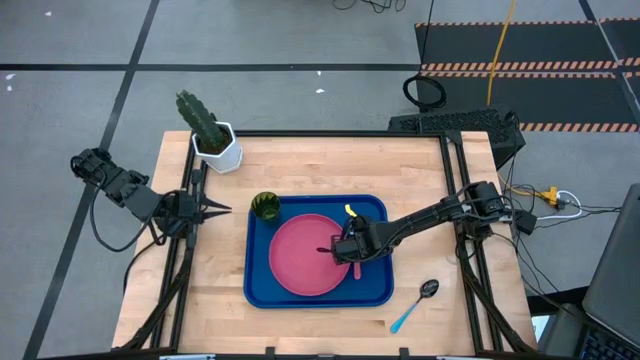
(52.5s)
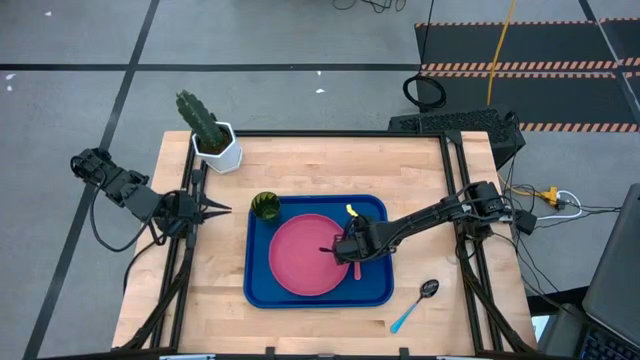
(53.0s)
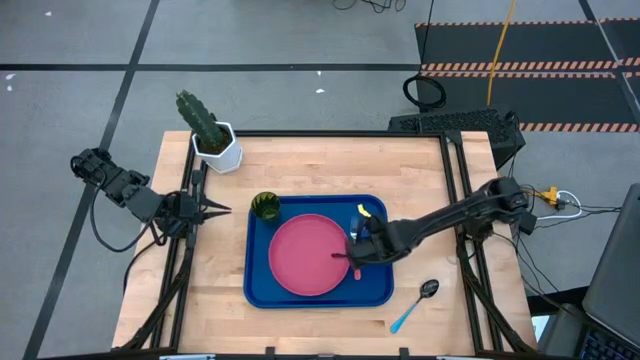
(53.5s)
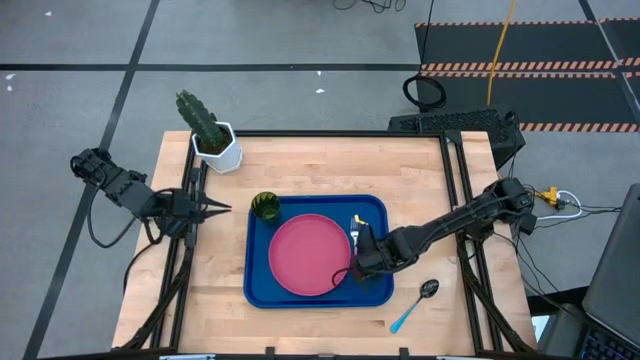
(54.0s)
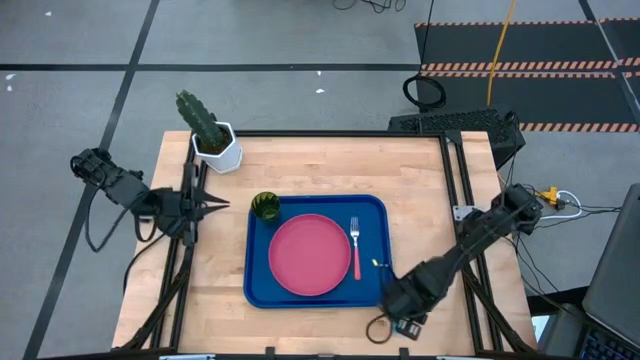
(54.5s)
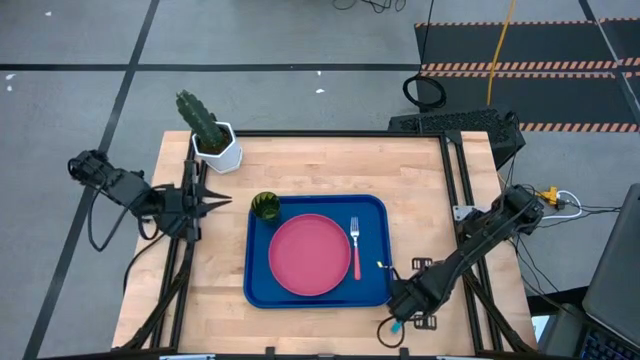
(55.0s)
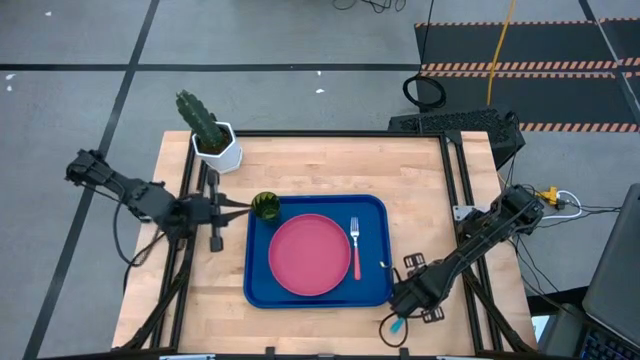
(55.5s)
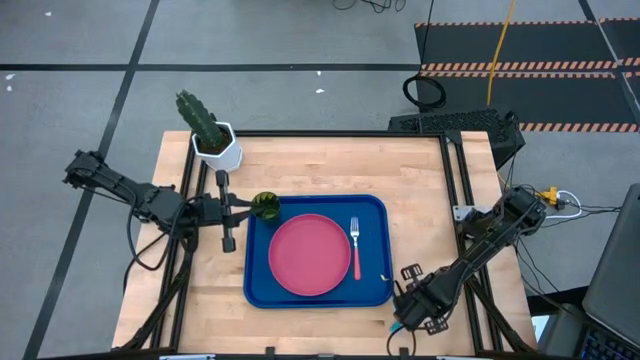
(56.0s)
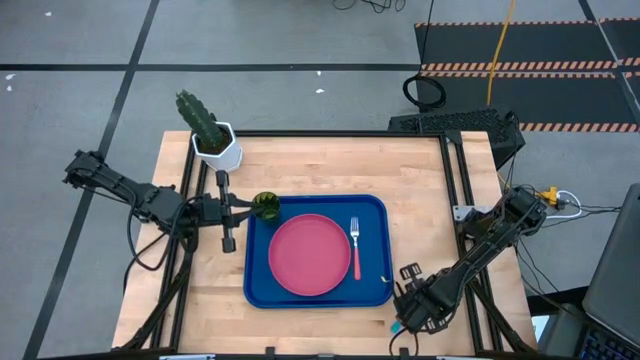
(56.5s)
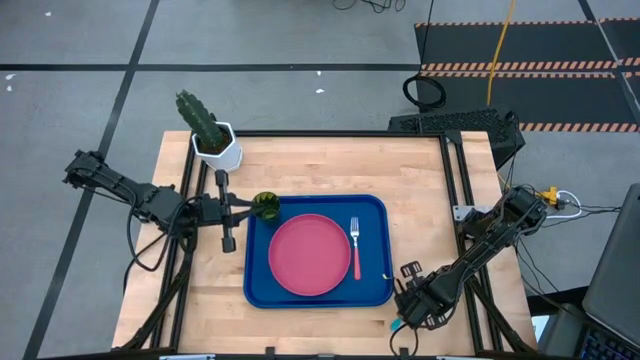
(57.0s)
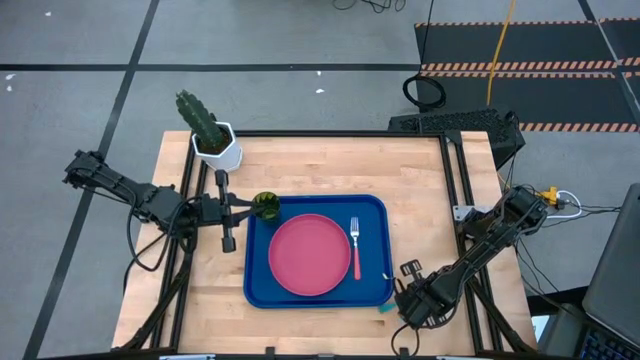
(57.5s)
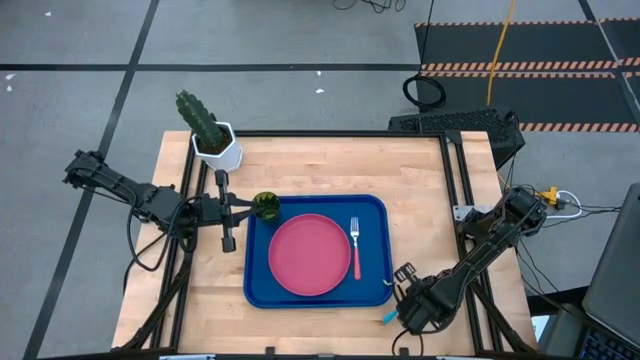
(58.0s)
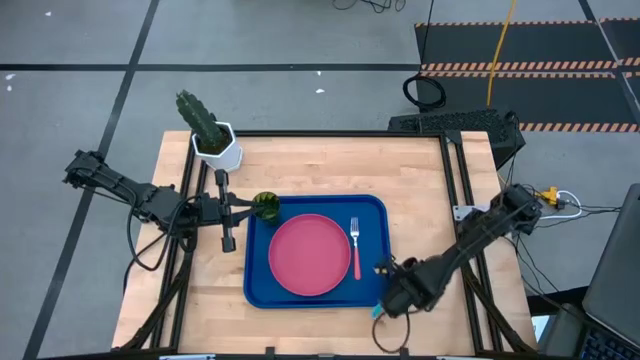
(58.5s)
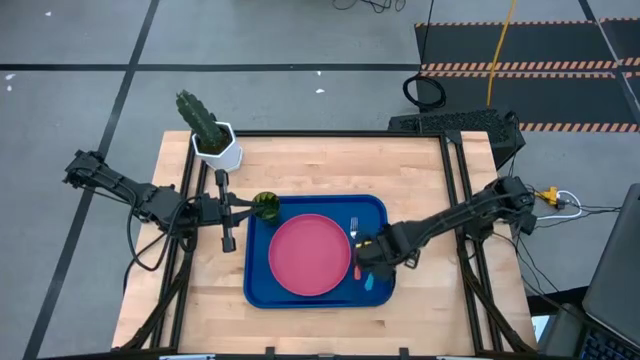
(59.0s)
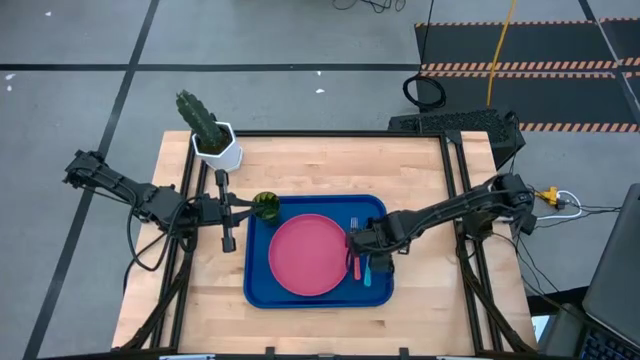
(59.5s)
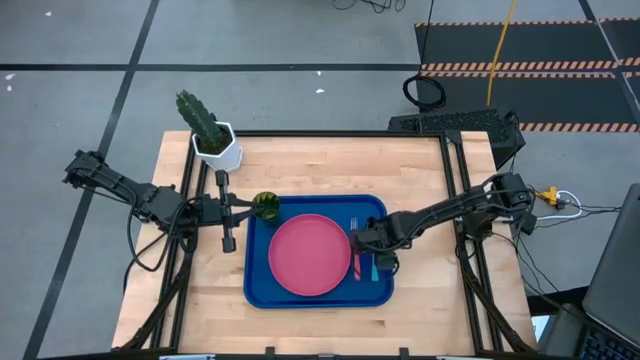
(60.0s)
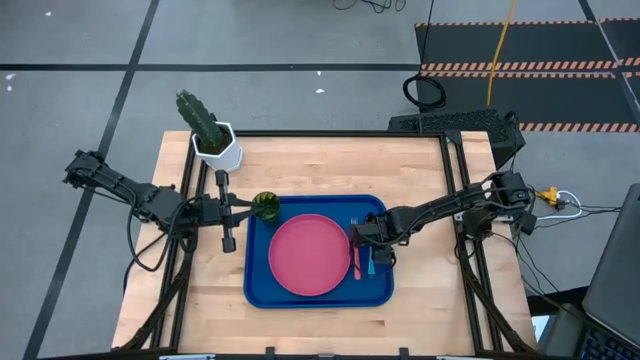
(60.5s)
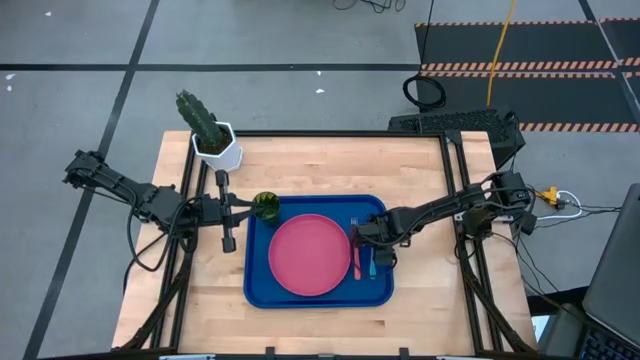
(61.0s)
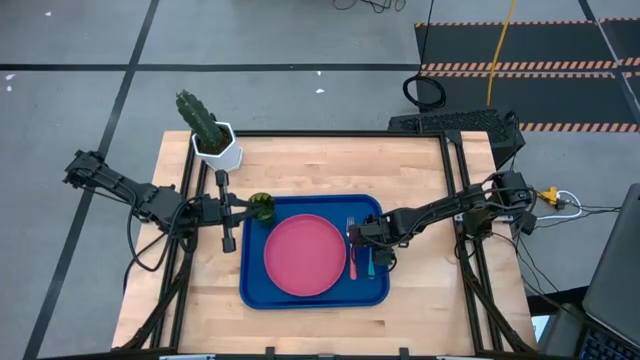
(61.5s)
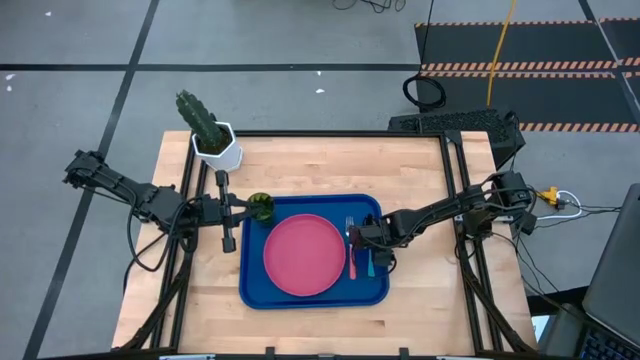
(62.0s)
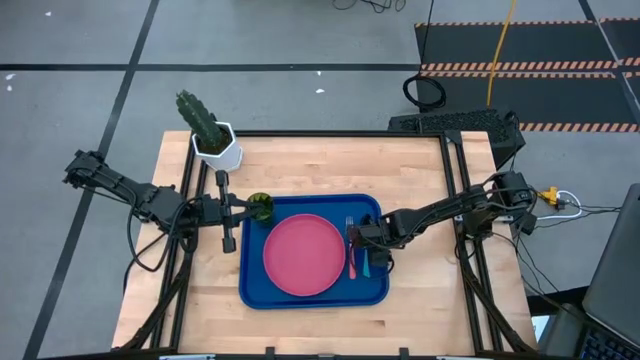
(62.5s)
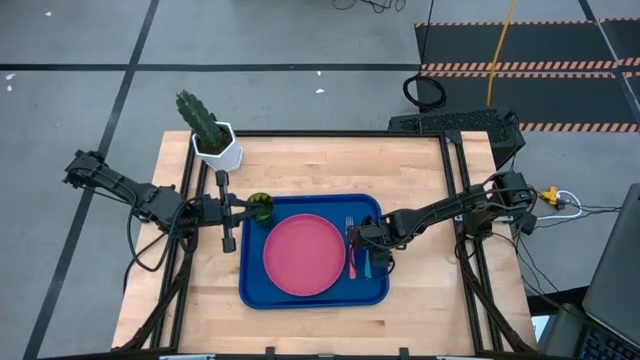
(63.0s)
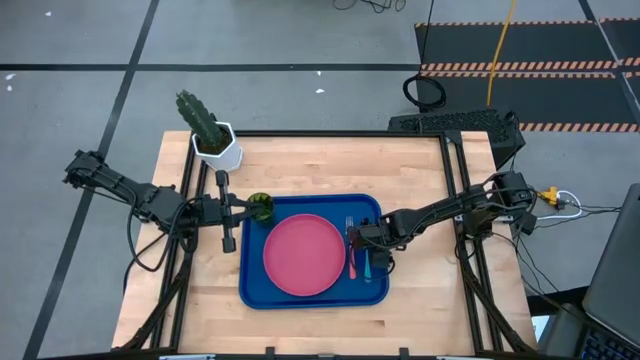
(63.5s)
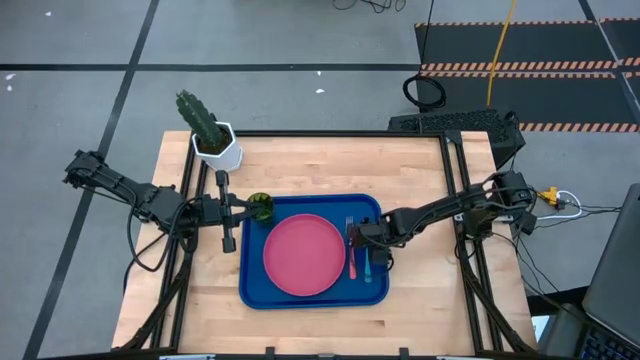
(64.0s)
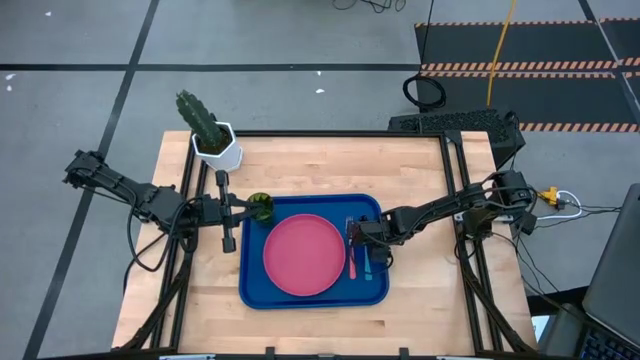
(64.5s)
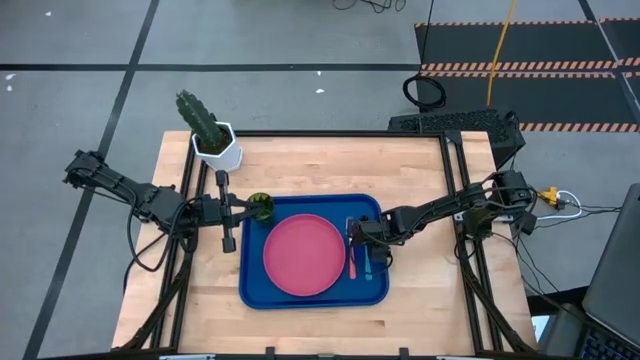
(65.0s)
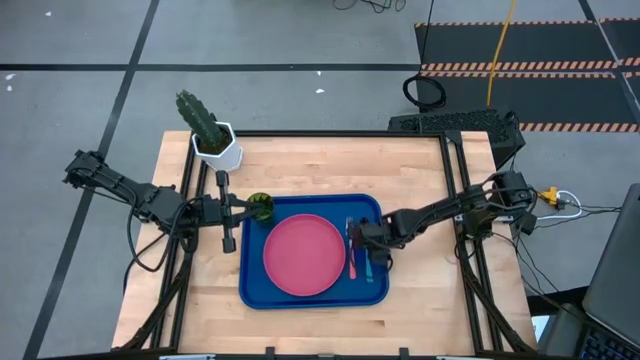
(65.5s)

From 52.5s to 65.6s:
Task: Pick and place plate/cup/fork/spoon on tray
Put the blue spoon on the right side of the pink fork on the blue serving tray

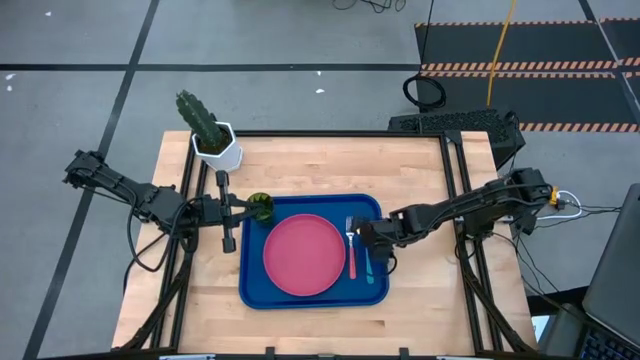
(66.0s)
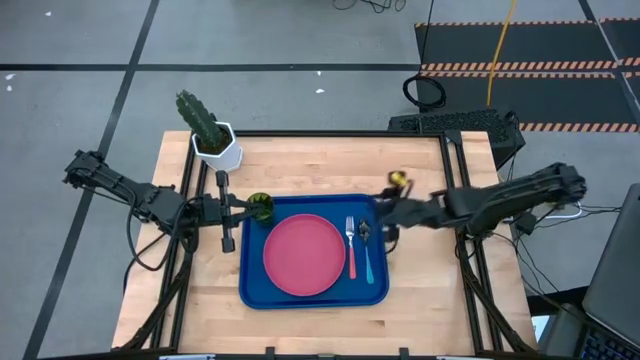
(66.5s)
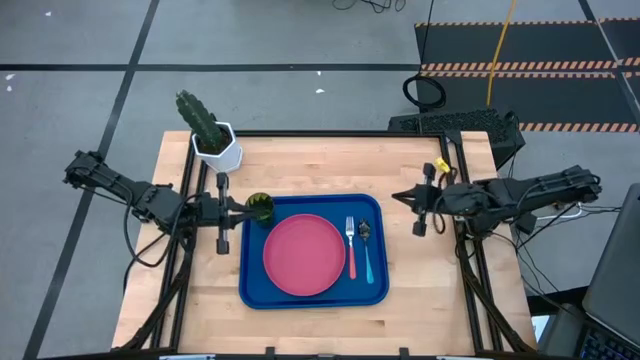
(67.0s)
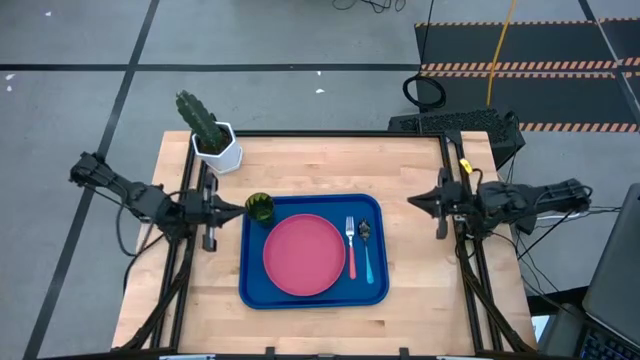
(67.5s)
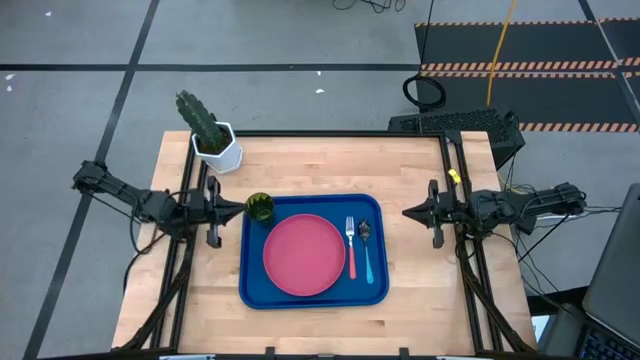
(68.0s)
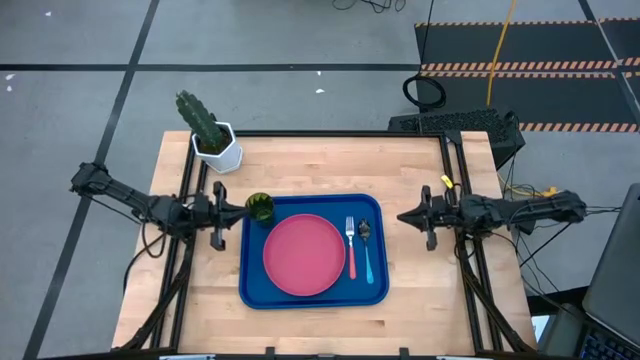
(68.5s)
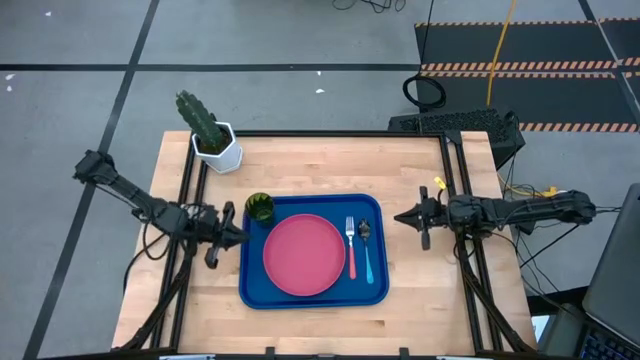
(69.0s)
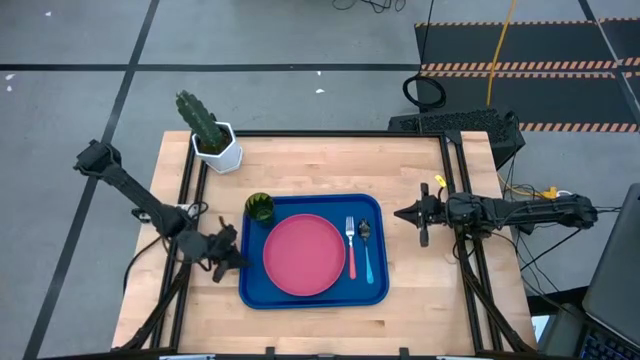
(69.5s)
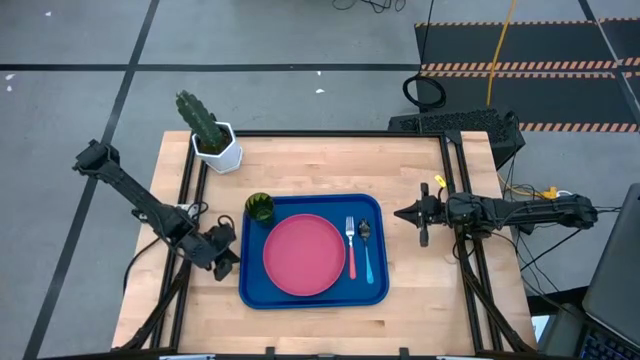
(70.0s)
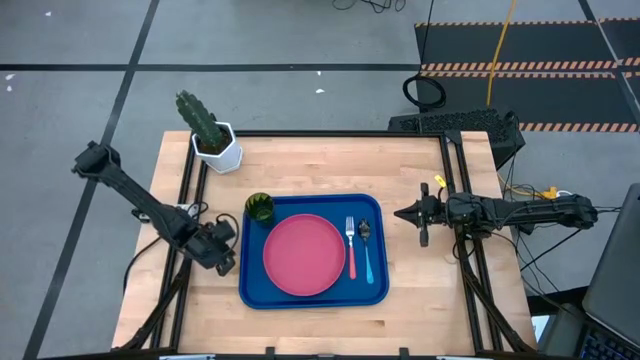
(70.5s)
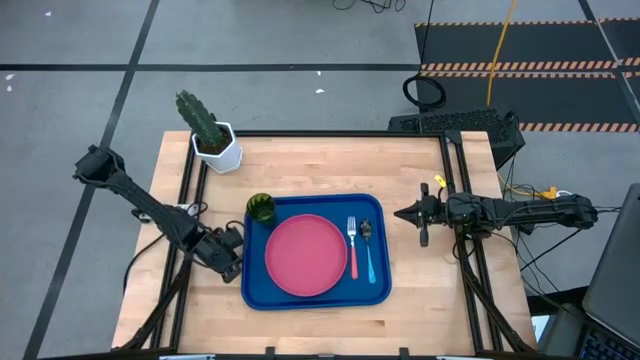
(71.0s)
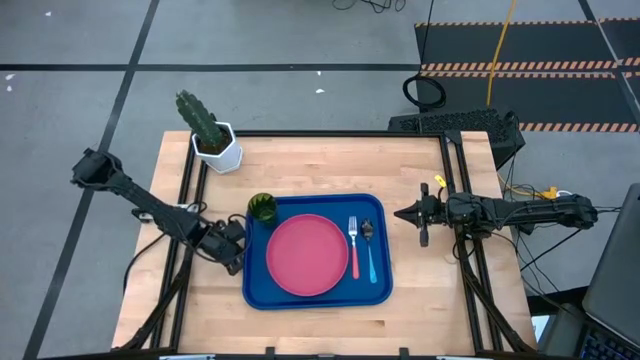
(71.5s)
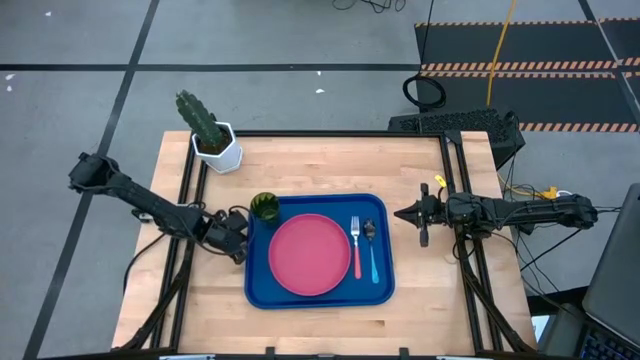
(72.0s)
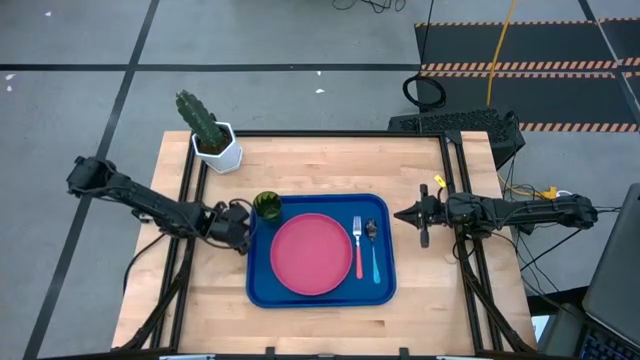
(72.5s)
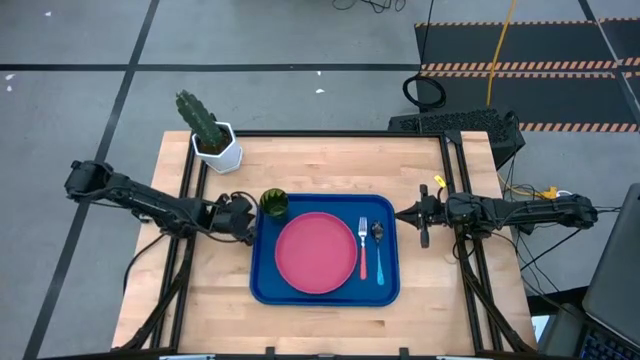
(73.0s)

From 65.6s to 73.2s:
Adjust the blue serving tray
